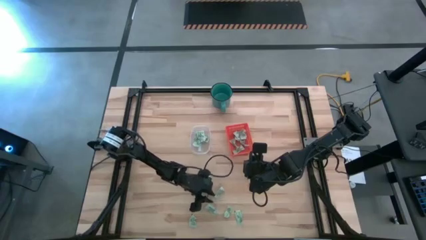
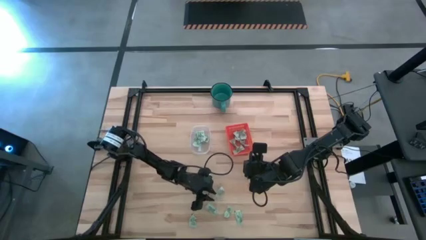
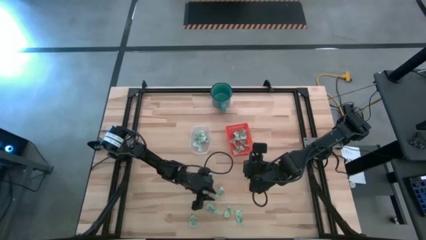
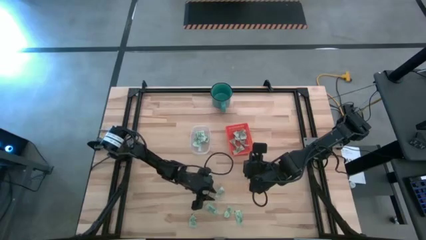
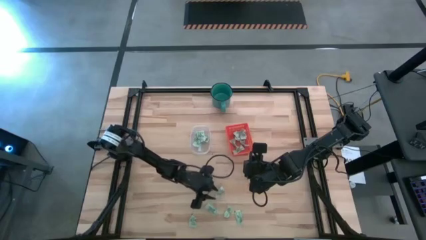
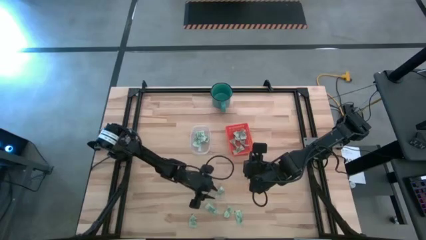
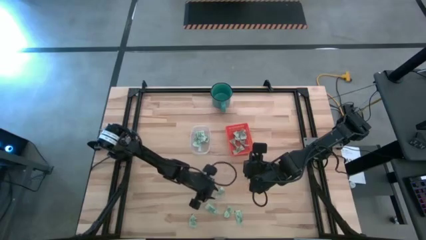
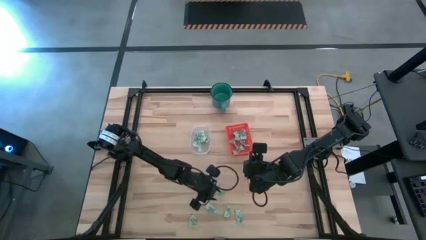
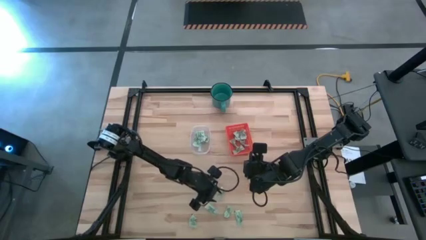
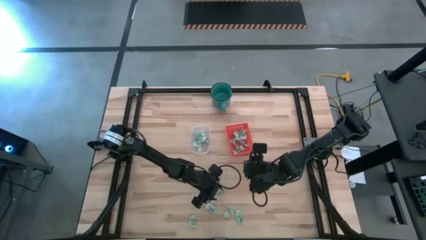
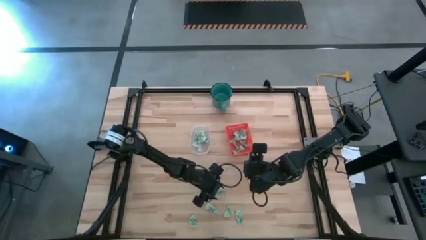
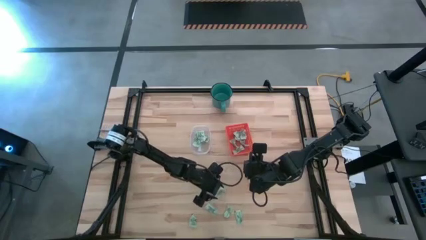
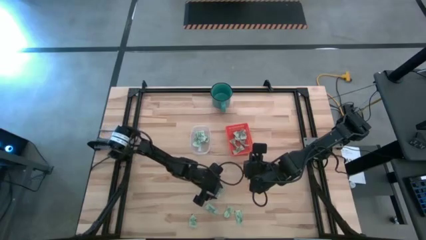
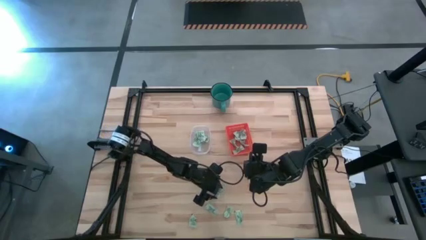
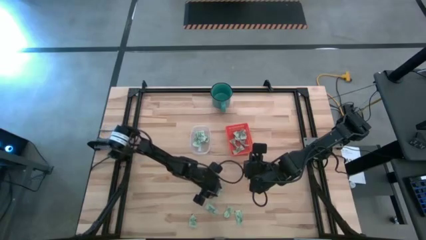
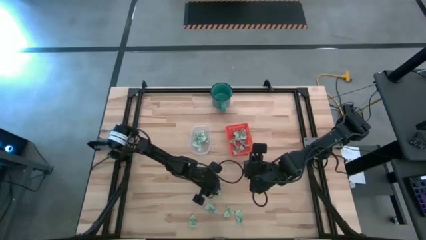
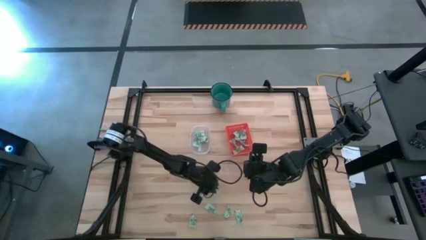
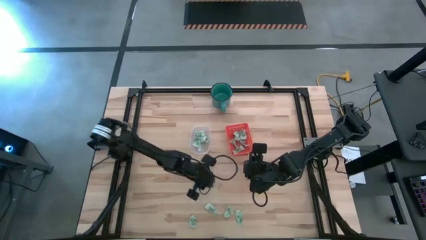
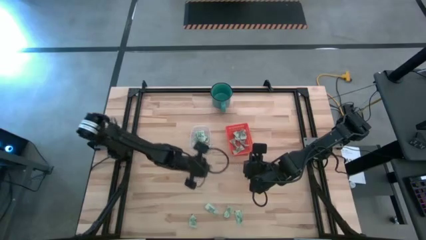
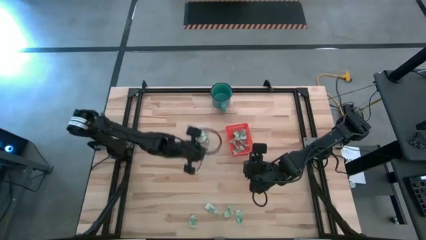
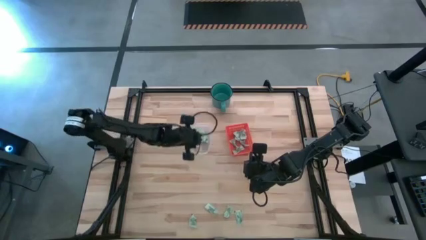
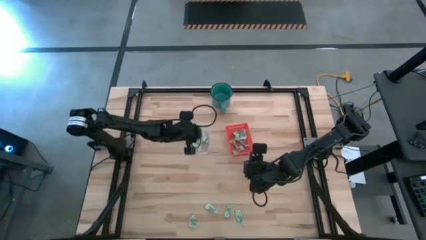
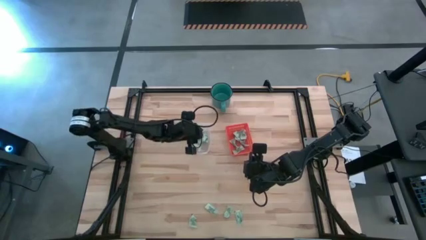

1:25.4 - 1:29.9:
Task: Pick and place items into bin
Put the stevia packet into the transparent bin

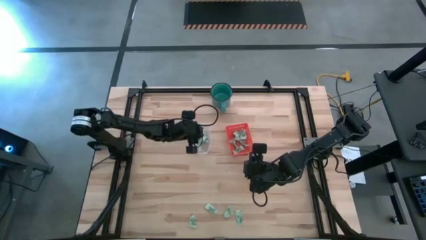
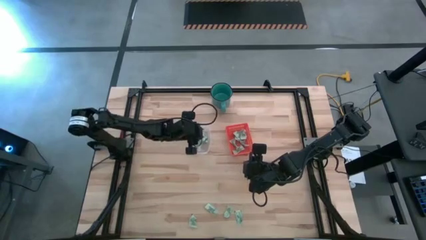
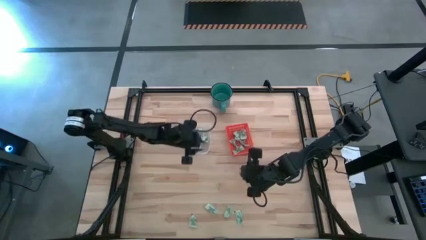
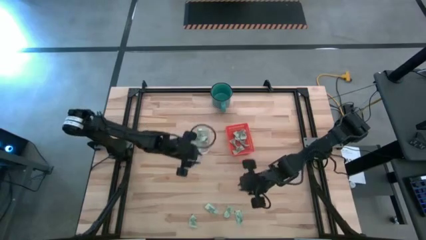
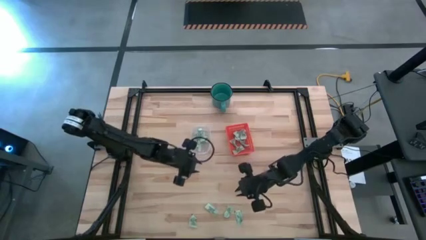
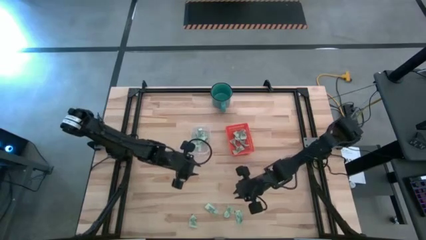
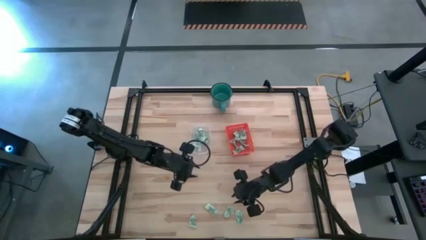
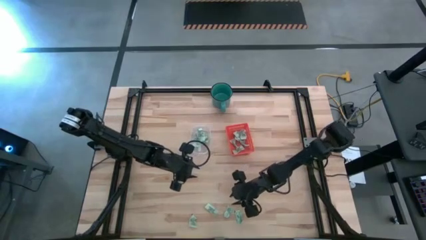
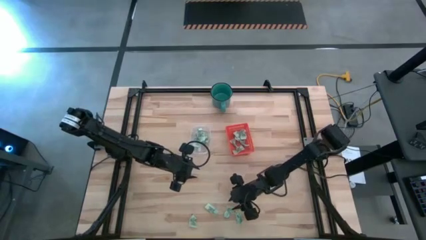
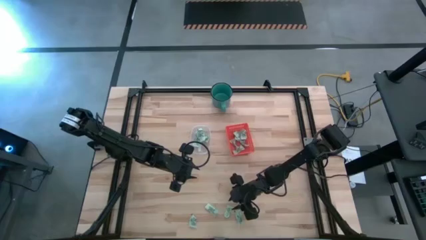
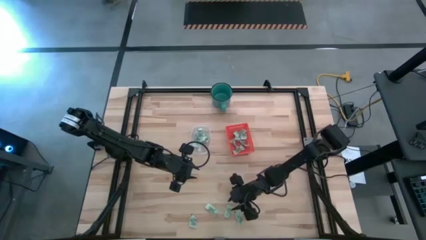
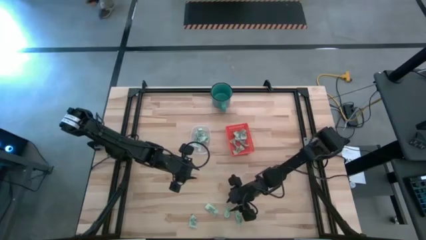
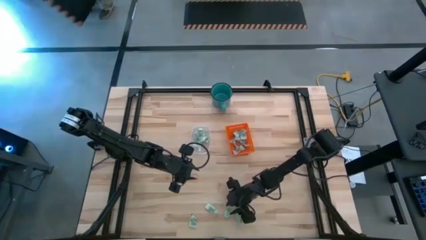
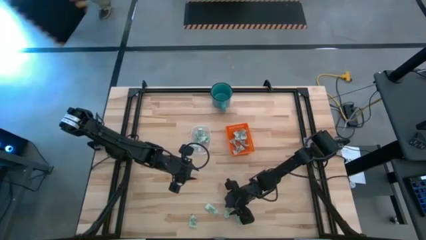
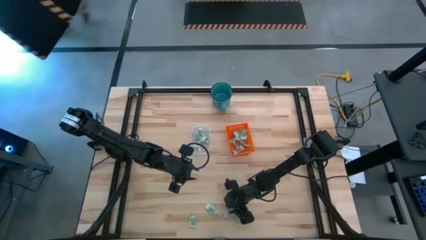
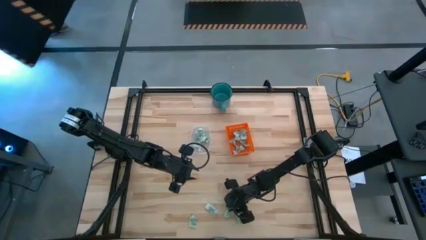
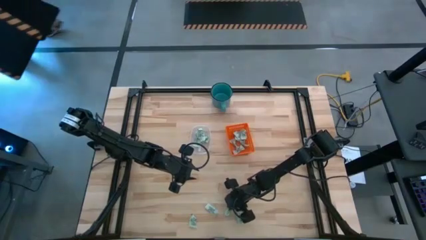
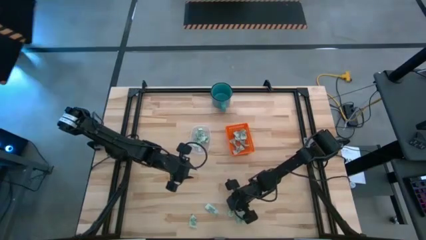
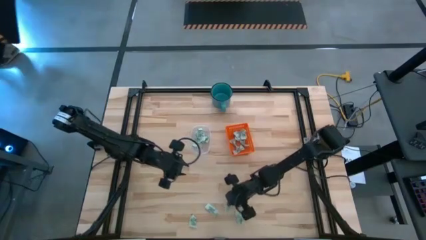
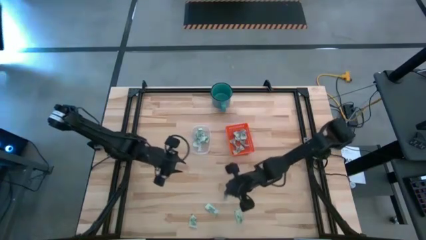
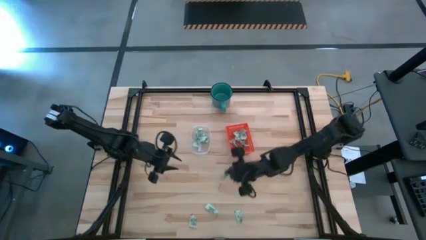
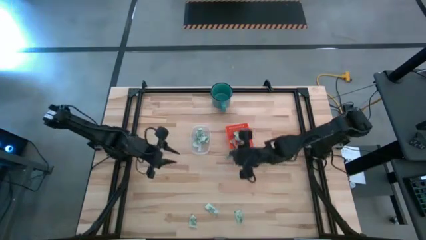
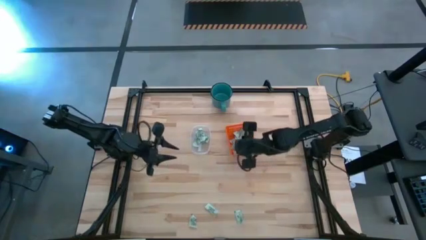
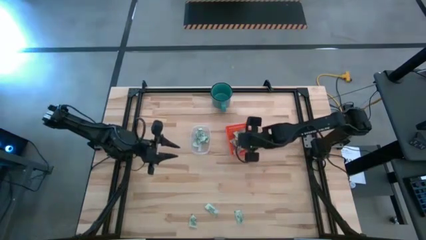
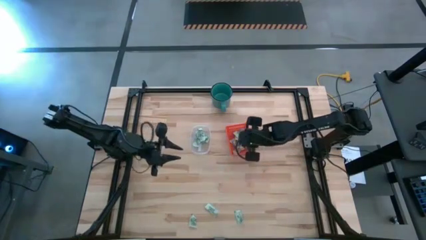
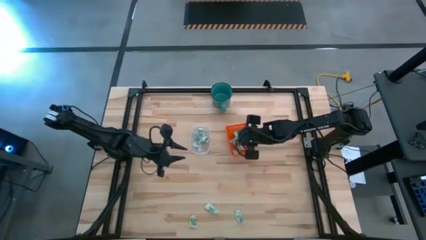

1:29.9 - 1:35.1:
Put the stevia packet into the orange bin

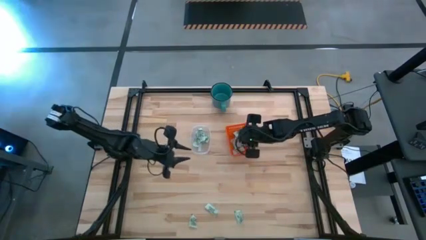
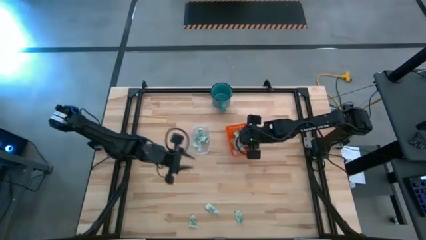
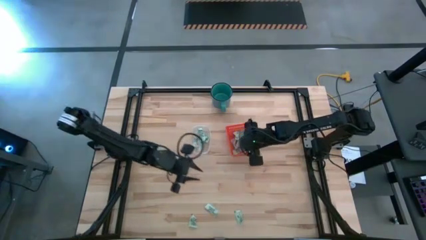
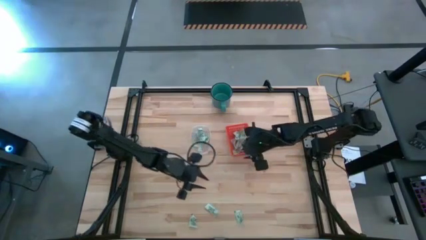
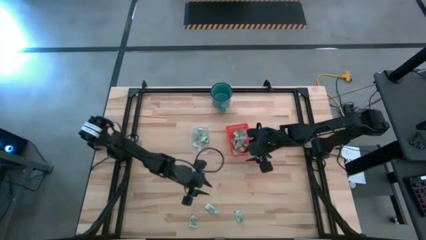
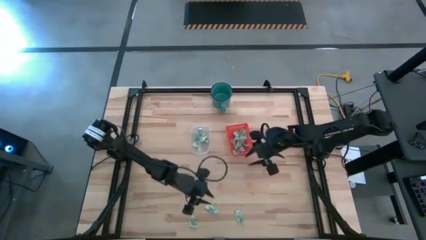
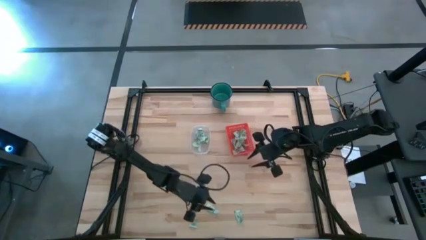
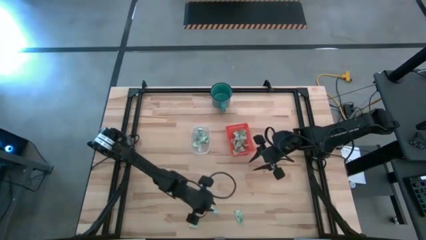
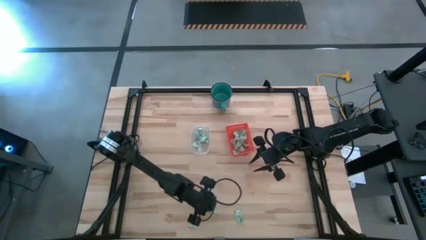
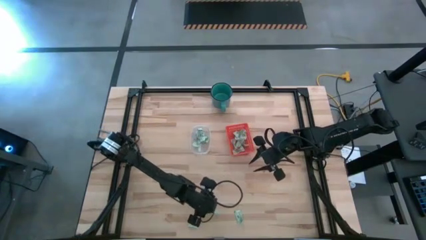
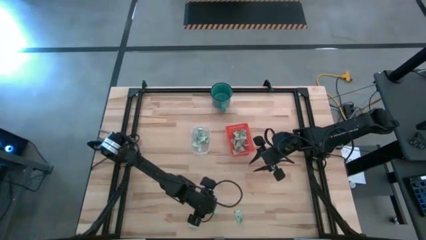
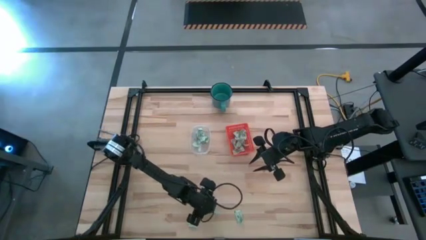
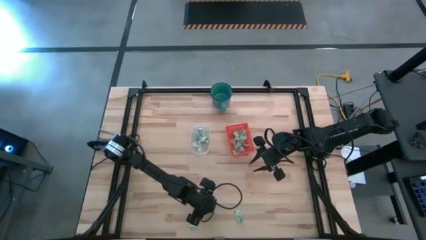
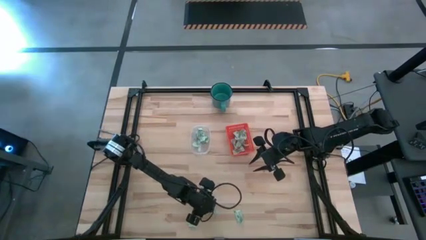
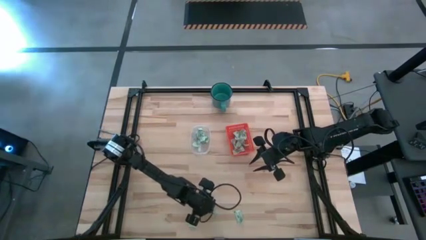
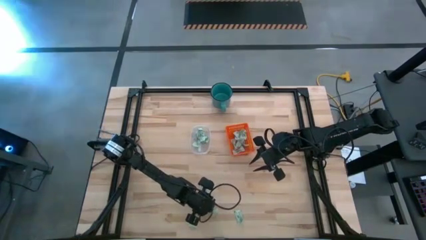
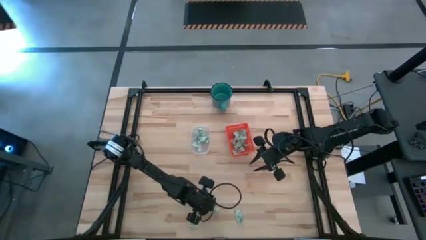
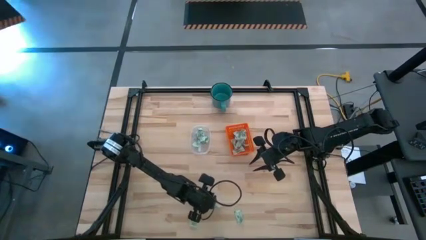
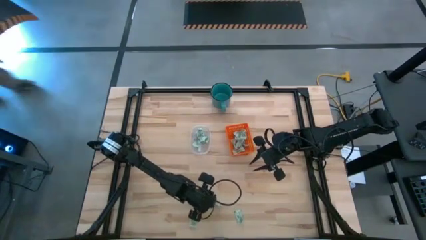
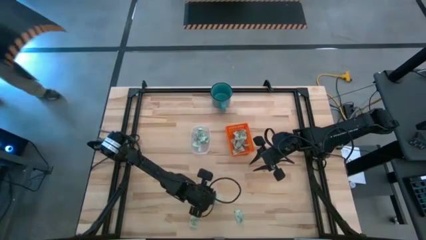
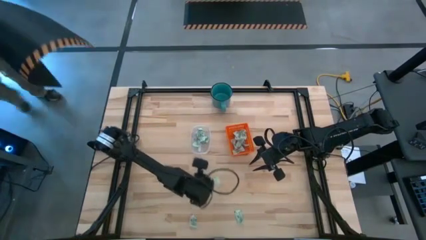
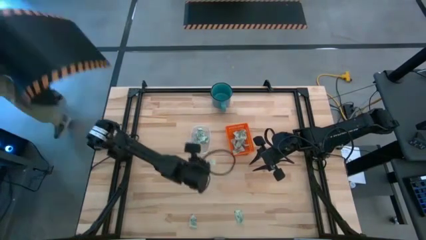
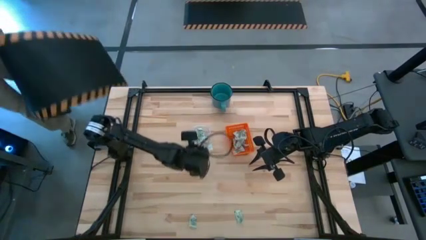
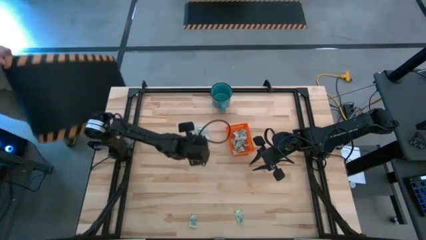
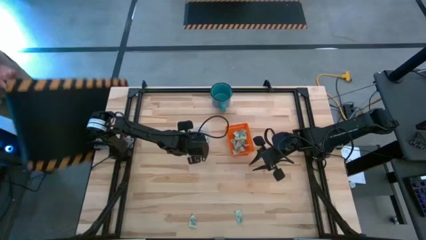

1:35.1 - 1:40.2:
Put the middle stevia packet into the transparent bin

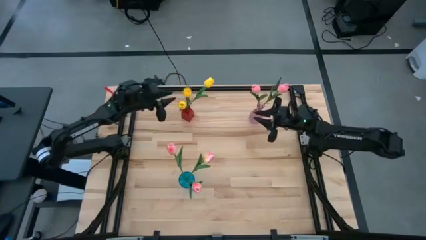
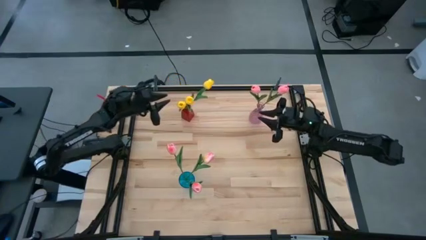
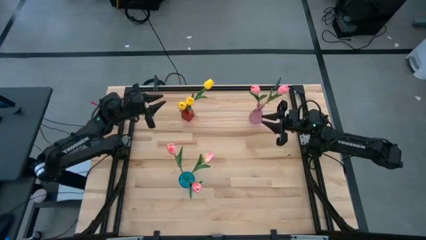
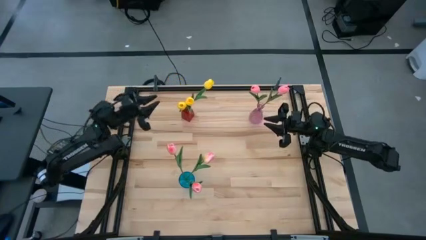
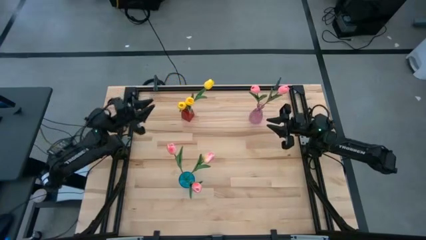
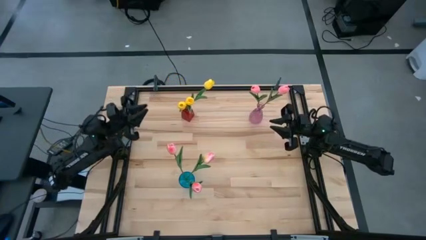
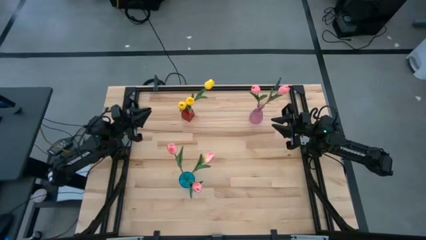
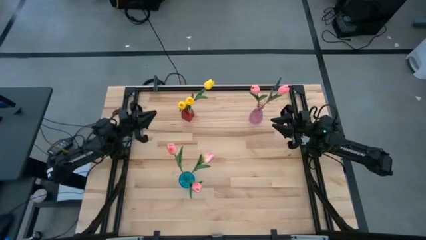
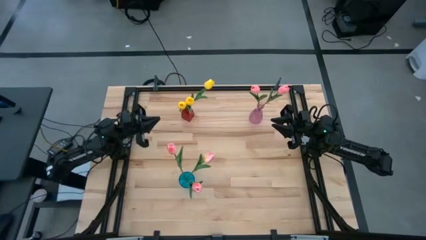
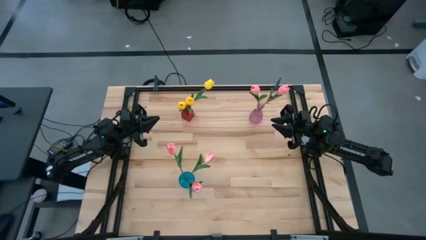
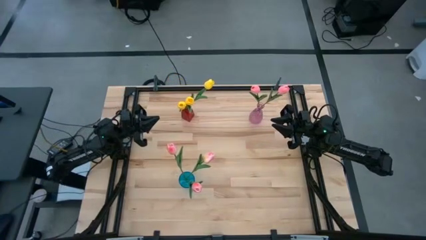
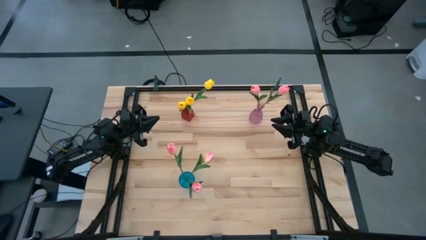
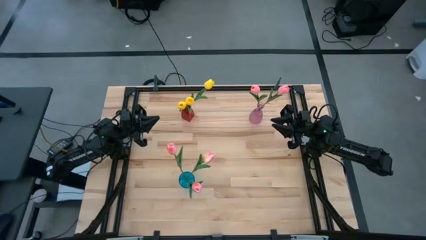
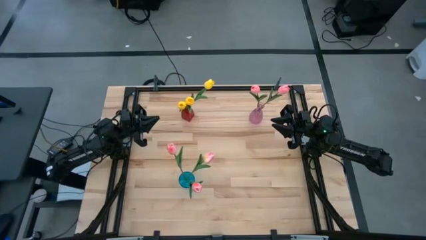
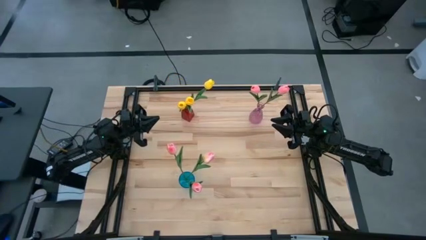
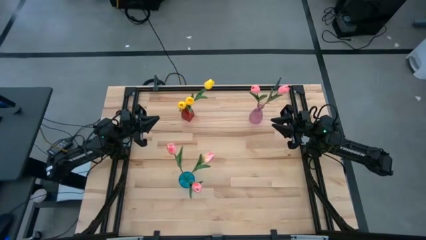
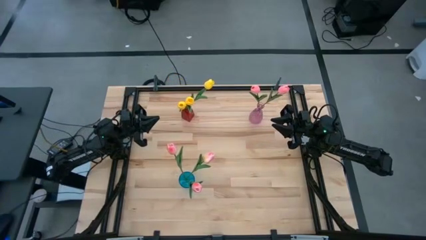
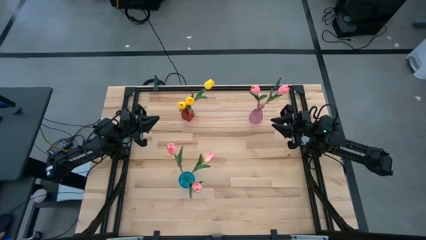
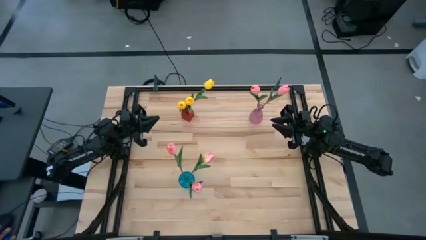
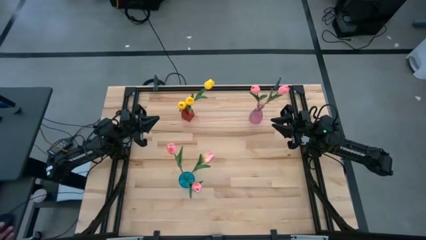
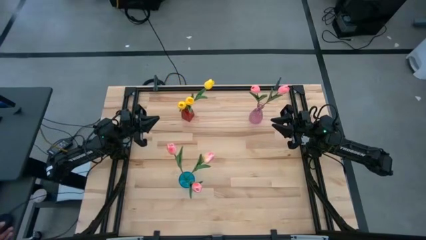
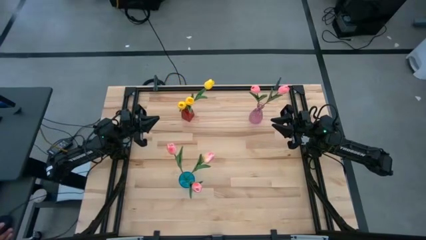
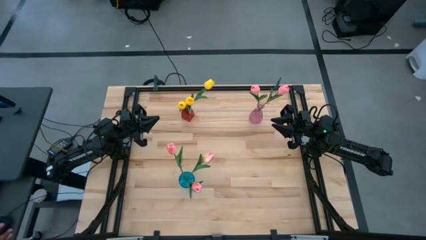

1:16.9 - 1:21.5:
Task: Sort flowers into vase by color
Return to Home Position
